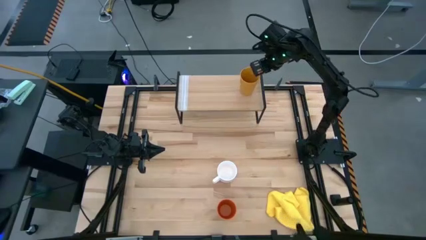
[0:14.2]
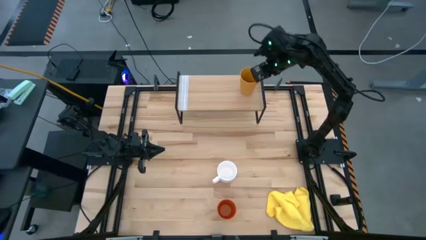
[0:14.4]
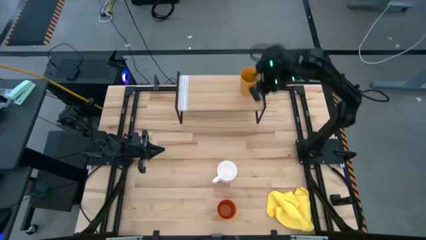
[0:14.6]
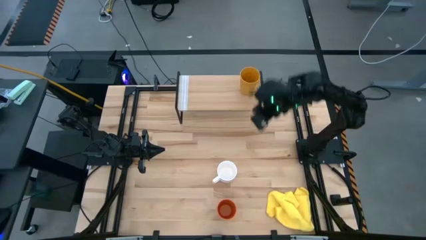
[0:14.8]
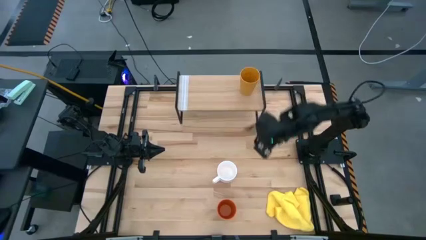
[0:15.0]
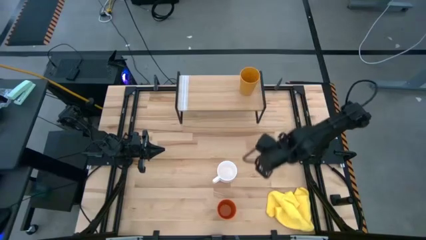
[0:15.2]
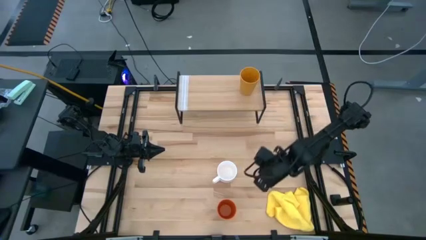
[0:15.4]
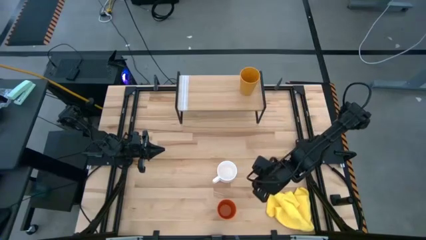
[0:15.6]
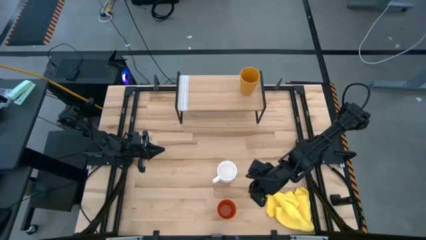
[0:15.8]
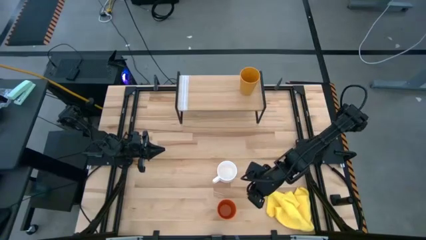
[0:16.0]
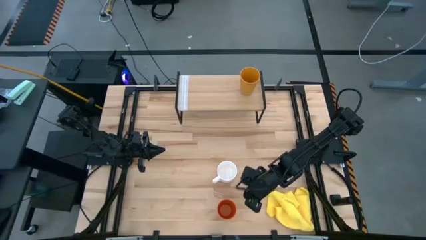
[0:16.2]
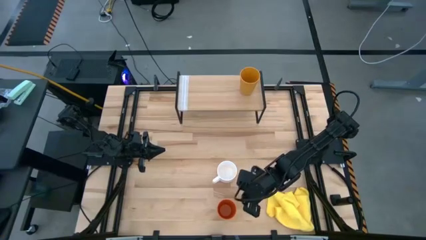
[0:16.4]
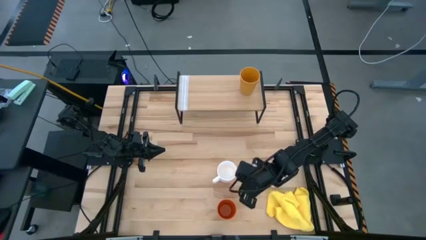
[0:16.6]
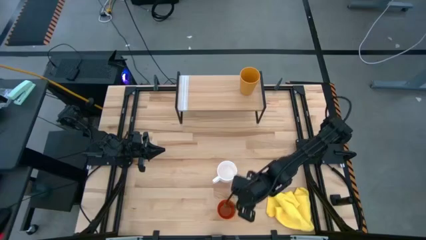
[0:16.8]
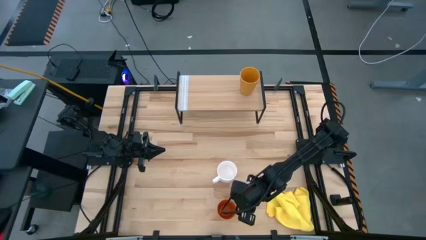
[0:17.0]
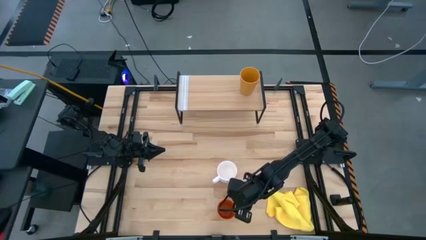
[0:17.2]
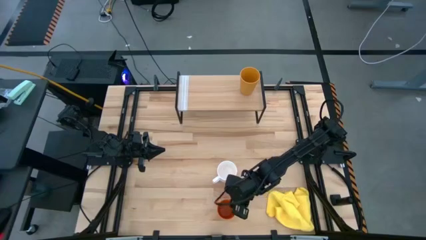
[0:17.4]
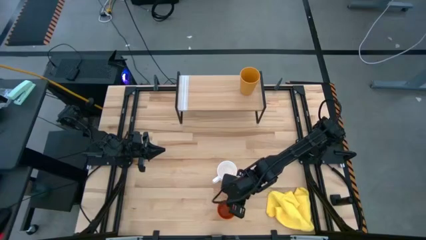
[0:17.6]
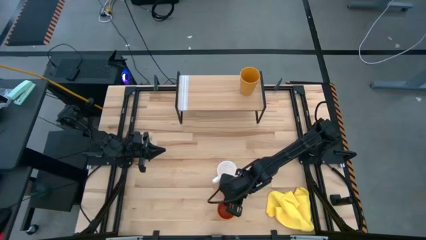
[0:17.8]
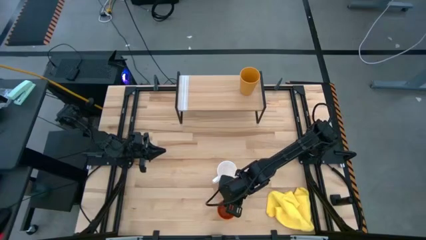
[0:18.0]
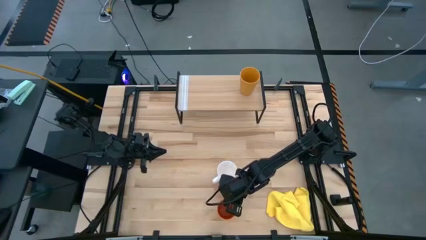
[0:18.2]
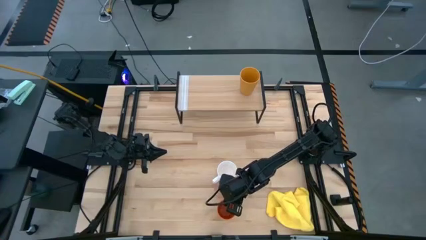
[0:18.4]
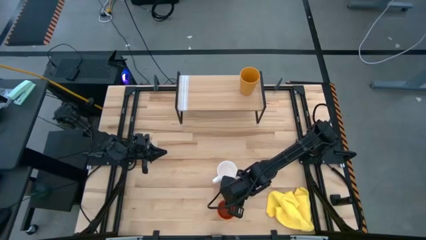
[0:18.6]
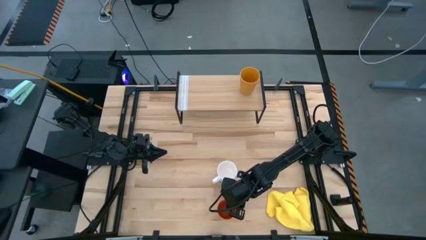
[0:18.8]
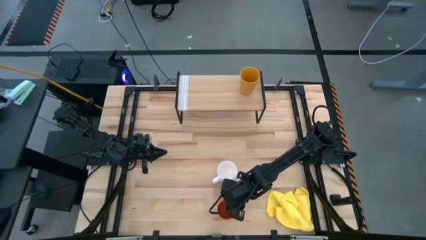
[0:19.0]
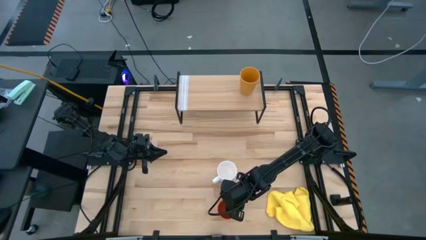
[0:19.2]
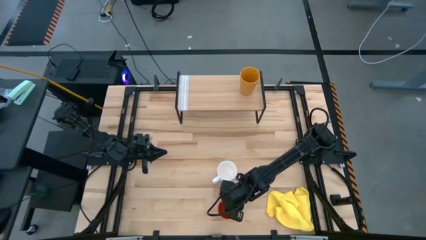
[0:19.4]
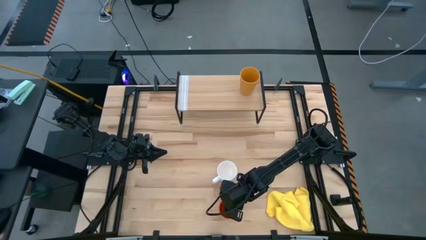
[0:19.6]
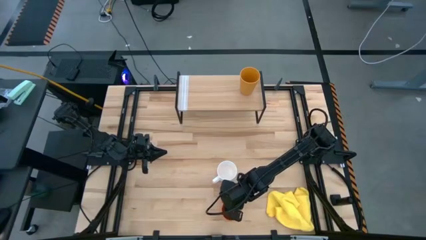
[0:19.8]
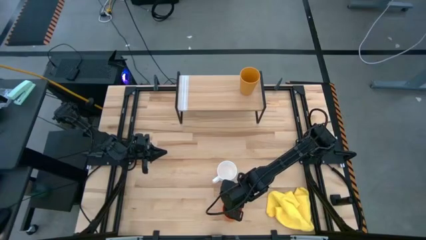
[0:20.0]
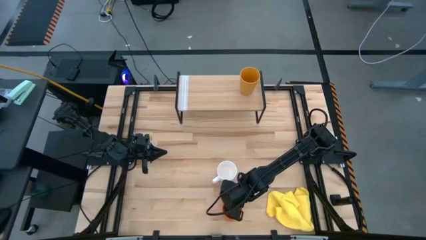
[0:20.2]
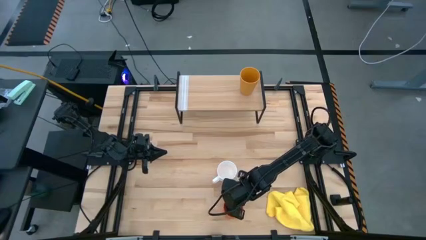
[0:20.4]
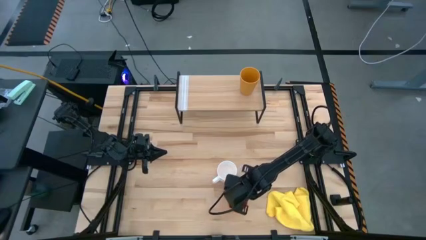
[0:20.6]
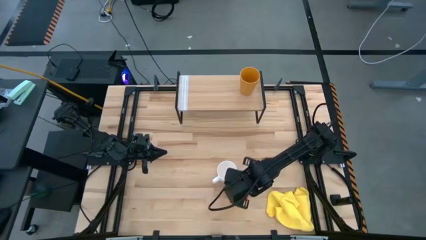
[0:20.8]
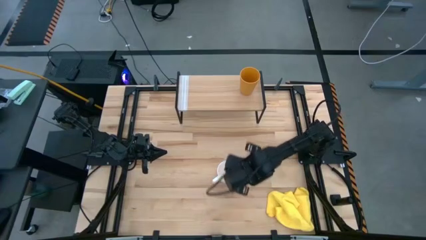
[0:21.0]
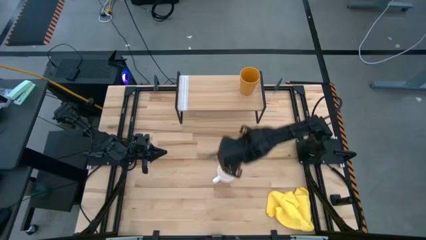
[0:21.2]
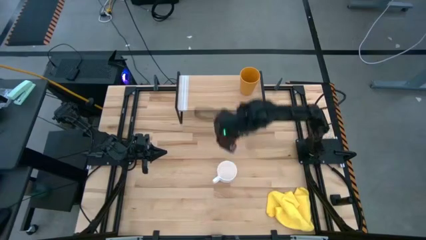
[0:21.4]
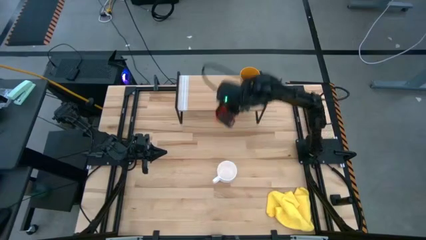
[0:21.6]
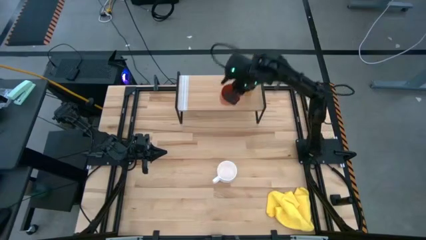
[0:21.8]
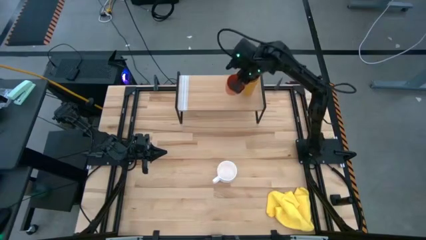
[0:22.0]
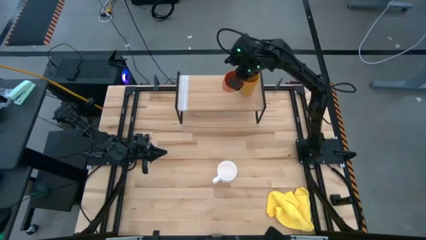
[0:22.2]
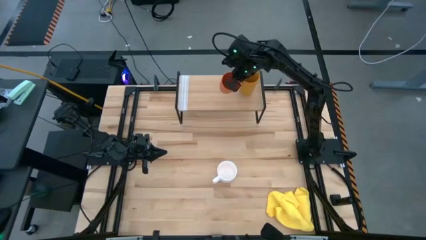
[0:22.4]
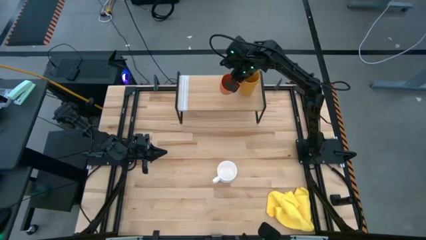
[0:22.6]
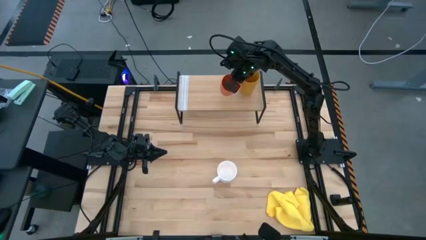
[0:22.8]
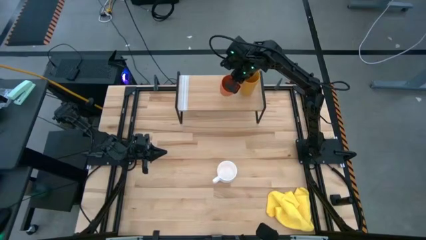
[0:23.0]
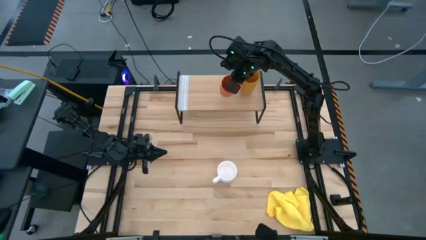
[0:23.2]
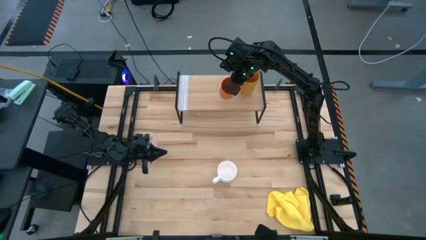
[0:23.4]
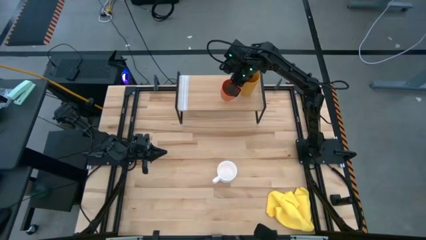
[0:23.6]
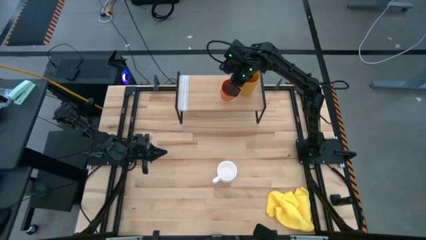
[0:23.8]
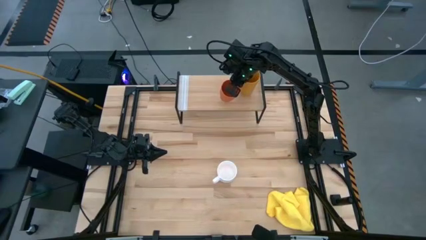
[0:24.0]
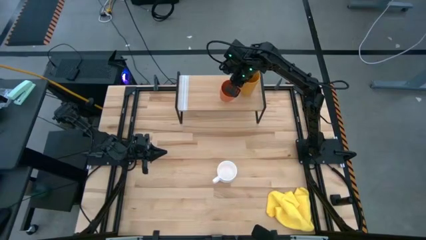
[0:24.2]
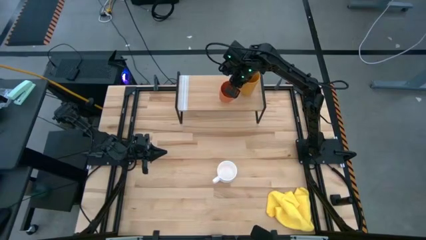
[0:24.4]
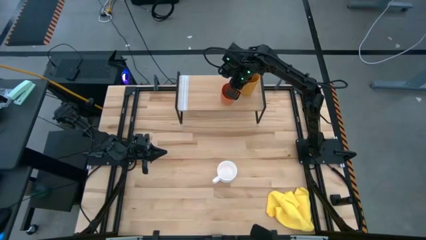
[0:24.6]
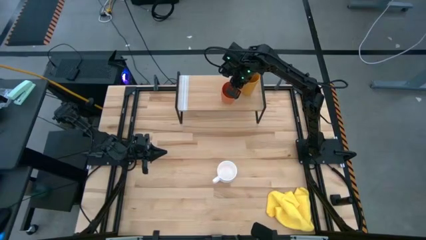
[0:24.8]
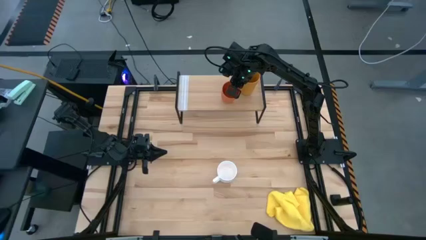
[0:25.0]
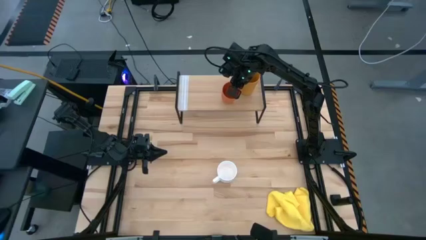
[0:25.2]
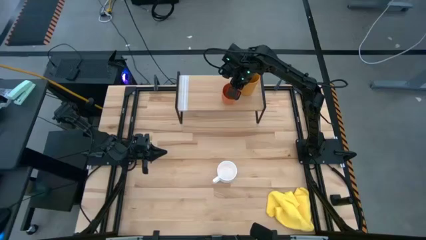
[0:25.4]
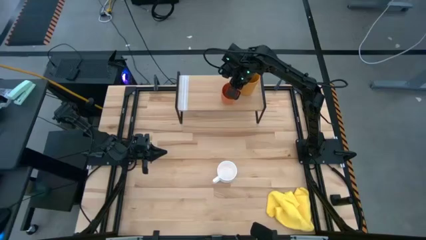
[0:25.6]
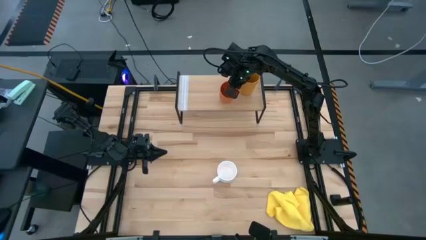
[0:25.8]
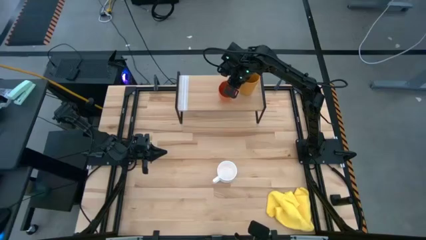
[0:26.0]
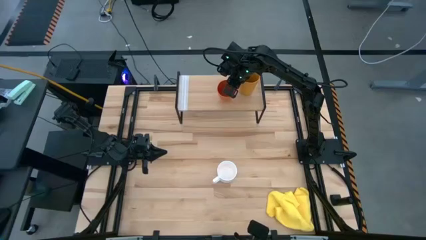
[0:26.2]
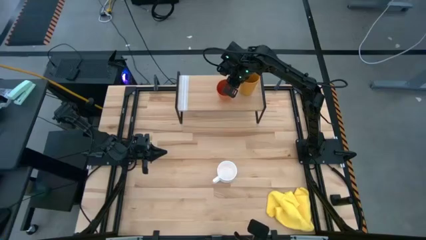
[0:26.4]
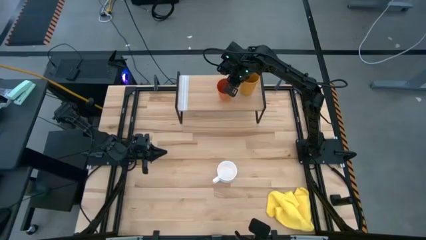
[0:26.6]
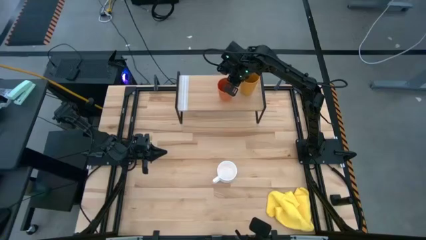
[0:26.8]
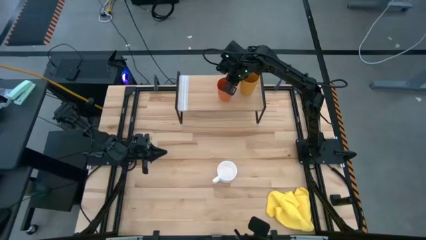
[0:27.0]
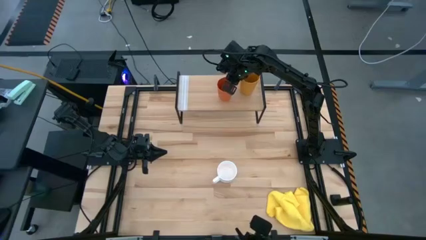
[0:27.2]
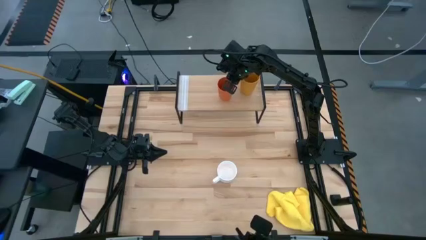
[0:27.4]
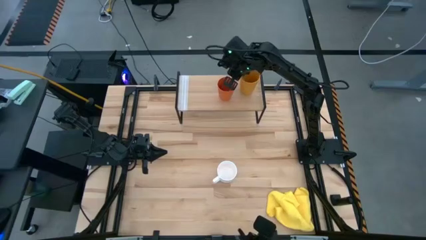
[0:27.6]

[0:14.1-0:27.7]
Task: Stack small to large cups/mugs on shelf
Put the orange cup on the shelf
